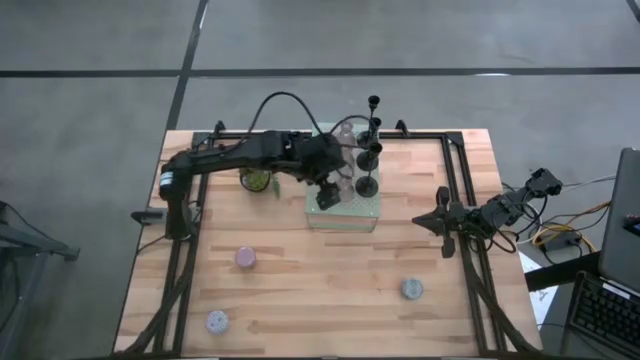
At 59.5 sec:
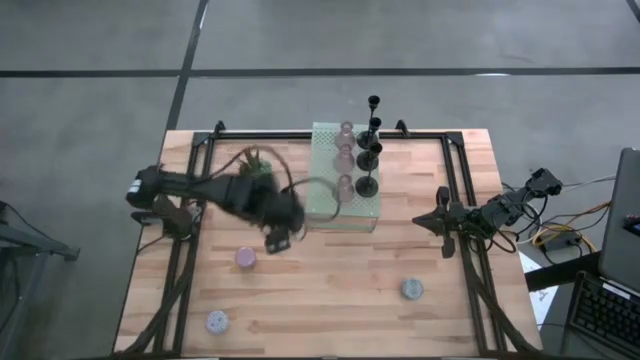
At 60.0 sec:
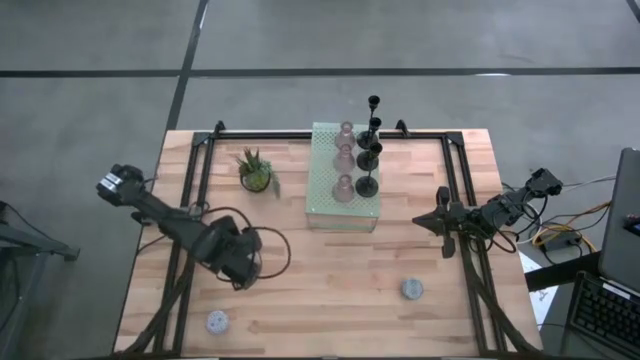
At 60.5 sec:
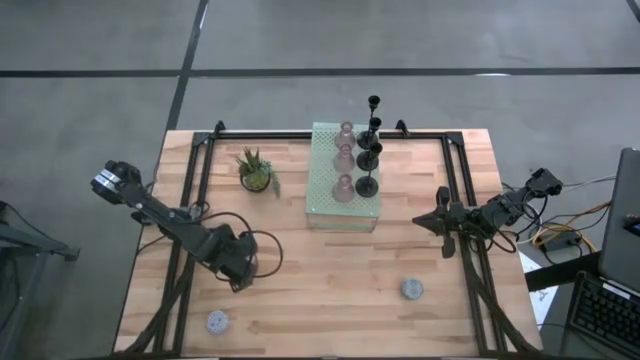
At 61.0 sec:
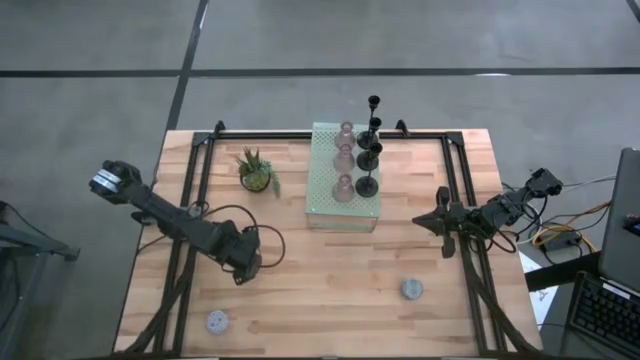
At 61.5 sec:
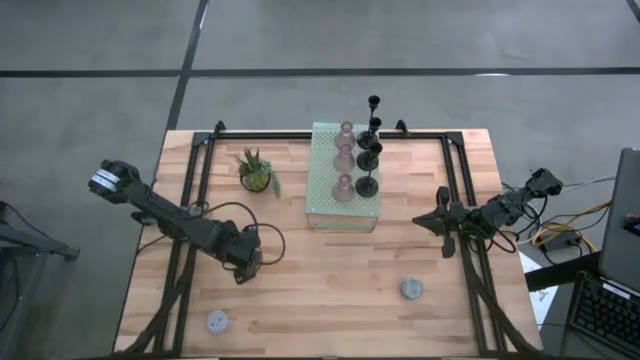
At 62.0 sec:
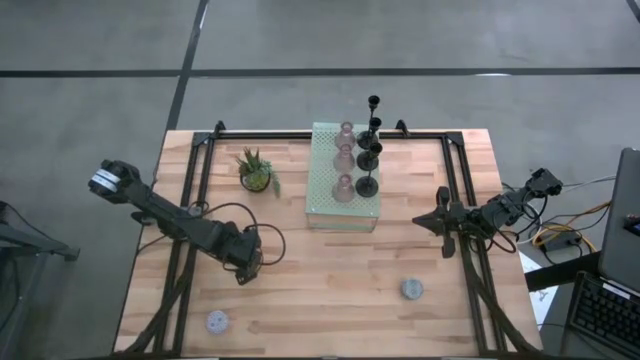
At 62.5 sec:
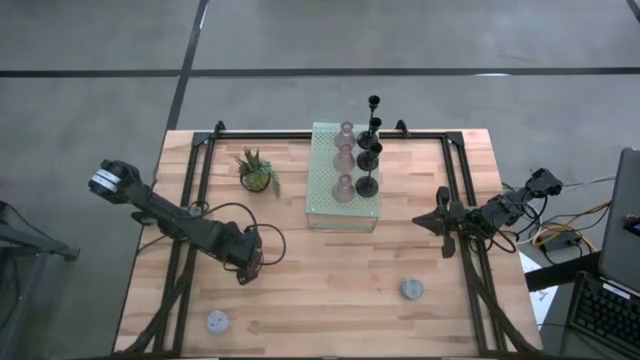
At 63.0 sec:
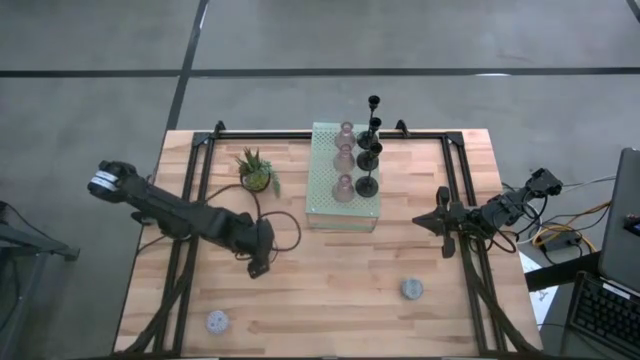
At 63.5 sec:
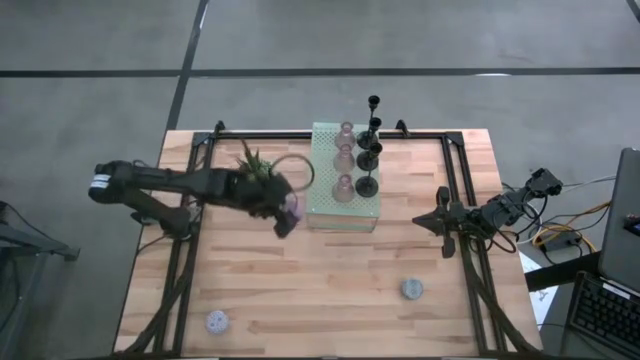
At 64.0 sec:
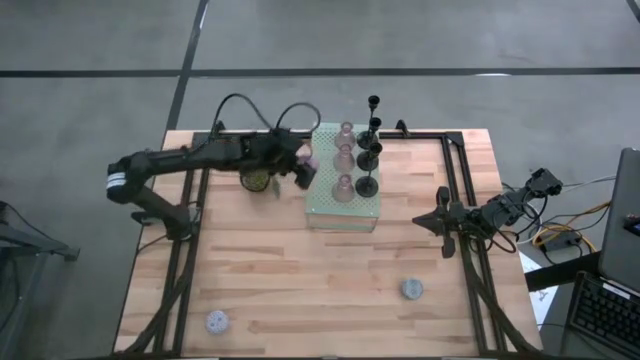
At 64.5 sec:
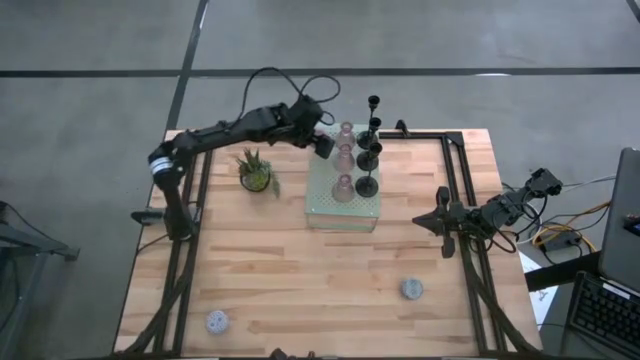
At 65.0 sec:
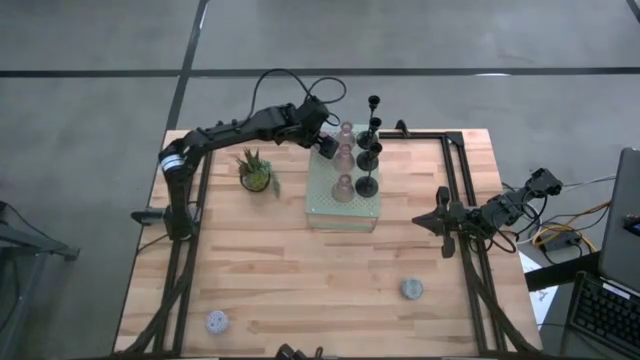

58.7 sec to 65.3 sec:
Task: Pick & Place candle stick holders
Put the pink scented candle on the shelf

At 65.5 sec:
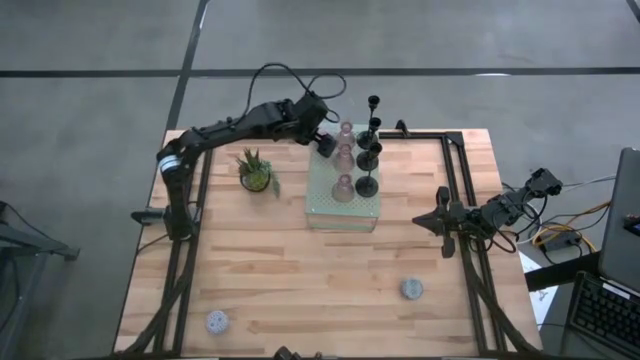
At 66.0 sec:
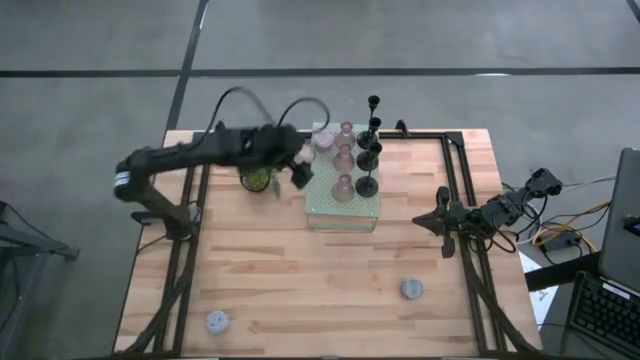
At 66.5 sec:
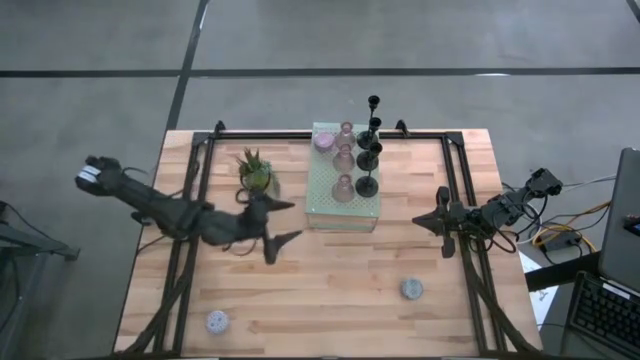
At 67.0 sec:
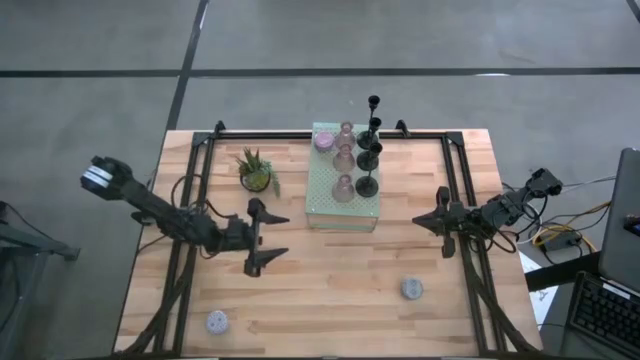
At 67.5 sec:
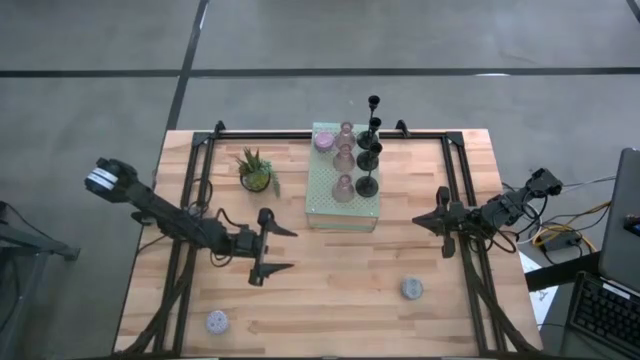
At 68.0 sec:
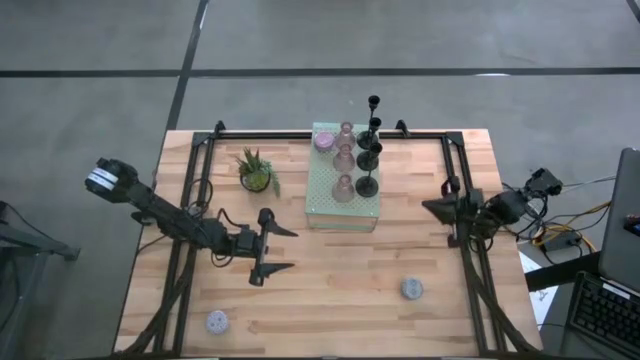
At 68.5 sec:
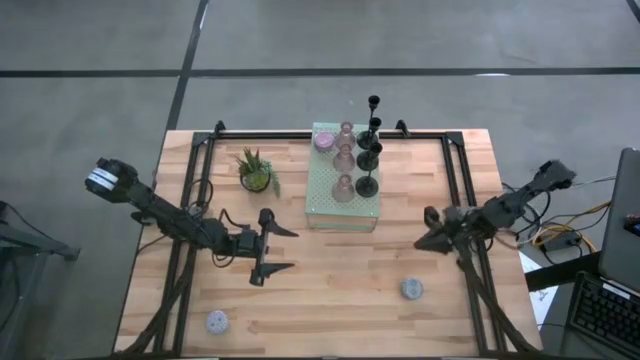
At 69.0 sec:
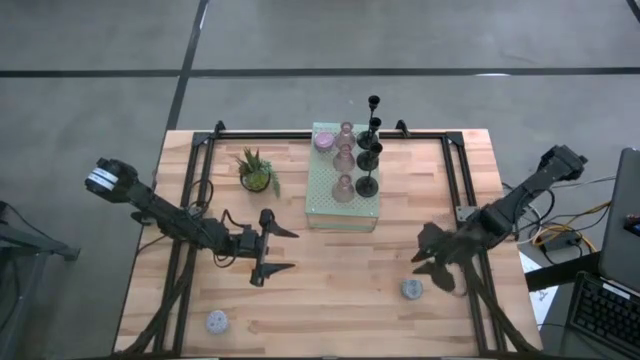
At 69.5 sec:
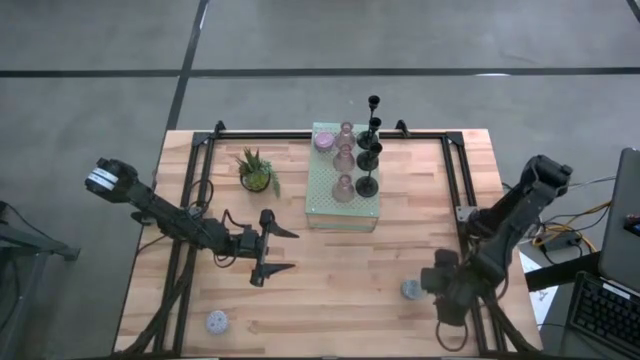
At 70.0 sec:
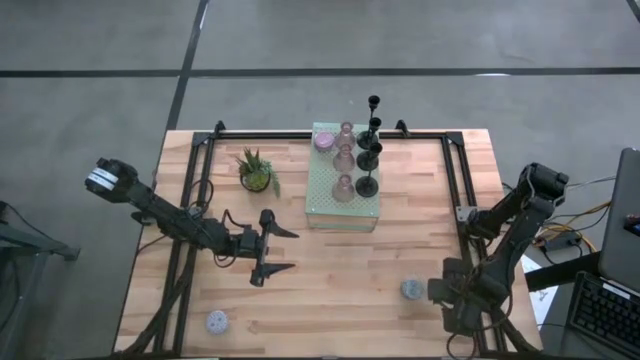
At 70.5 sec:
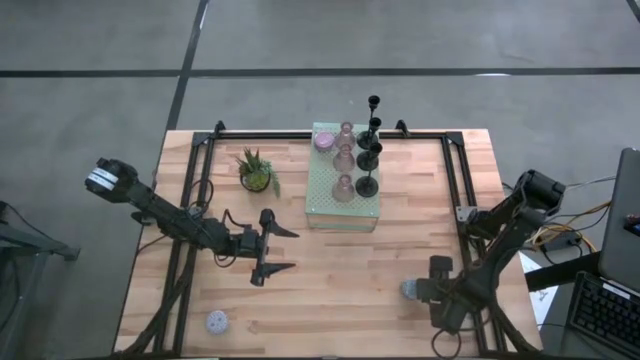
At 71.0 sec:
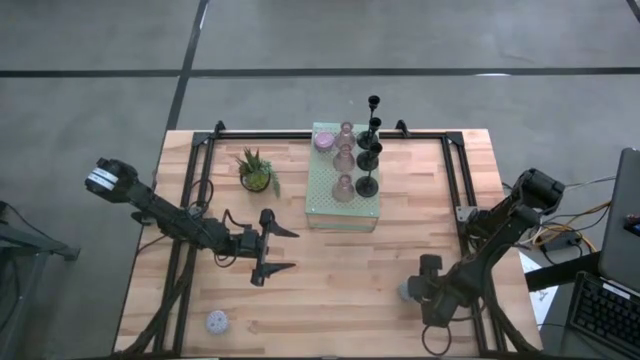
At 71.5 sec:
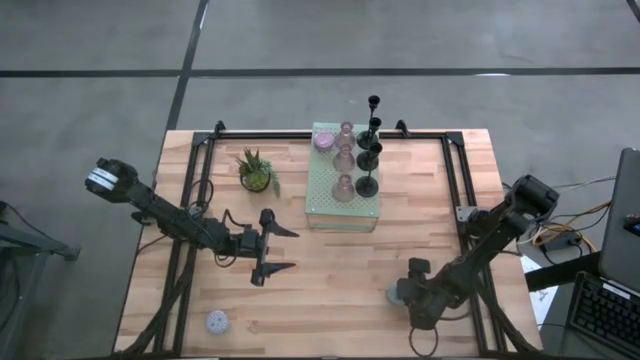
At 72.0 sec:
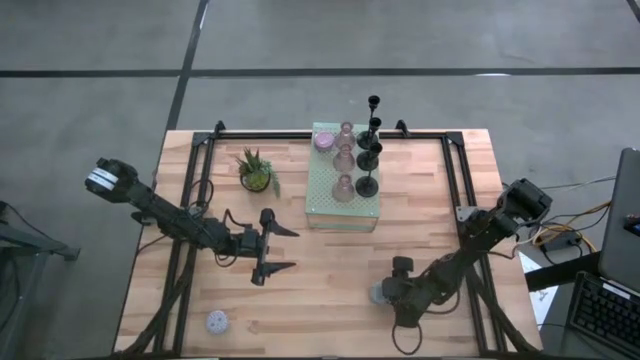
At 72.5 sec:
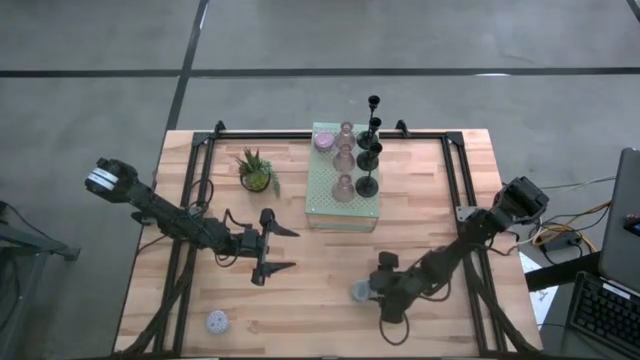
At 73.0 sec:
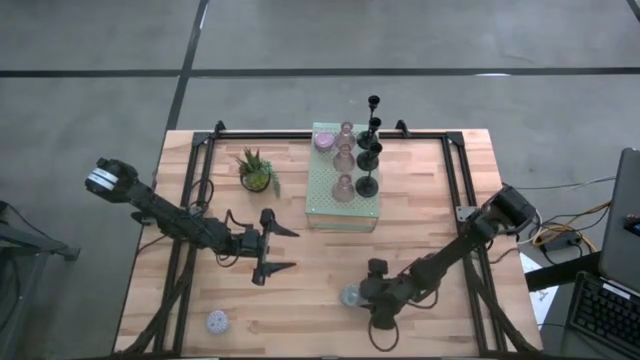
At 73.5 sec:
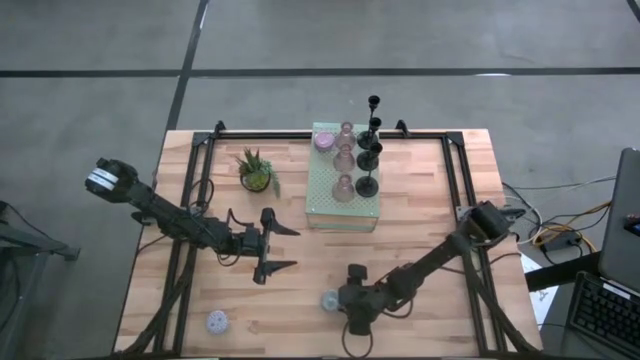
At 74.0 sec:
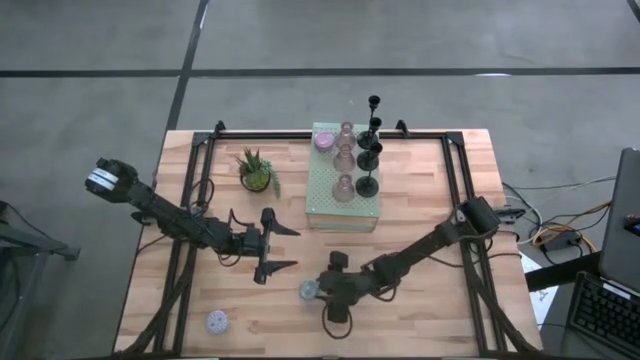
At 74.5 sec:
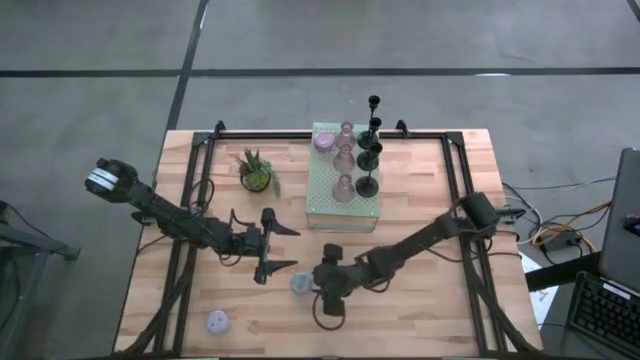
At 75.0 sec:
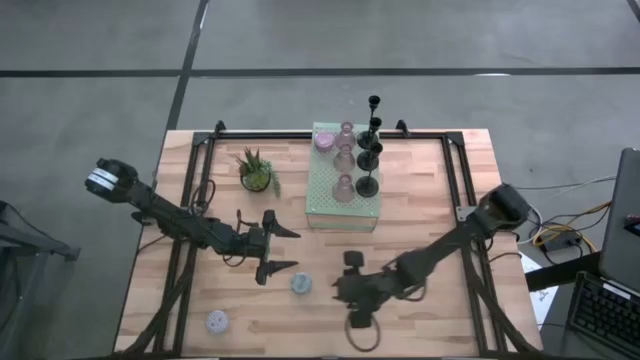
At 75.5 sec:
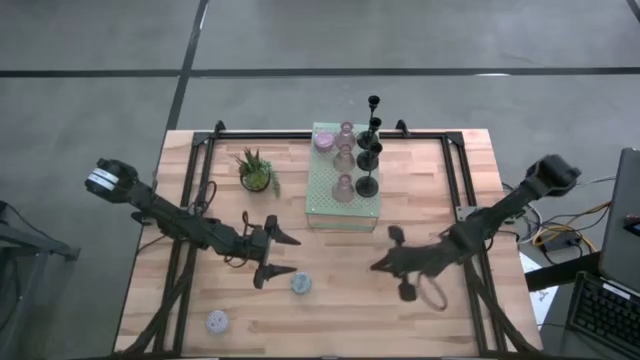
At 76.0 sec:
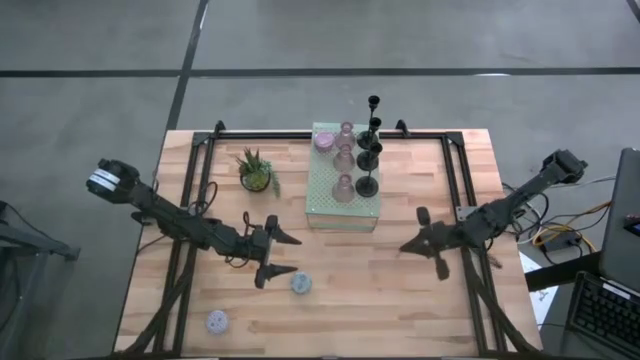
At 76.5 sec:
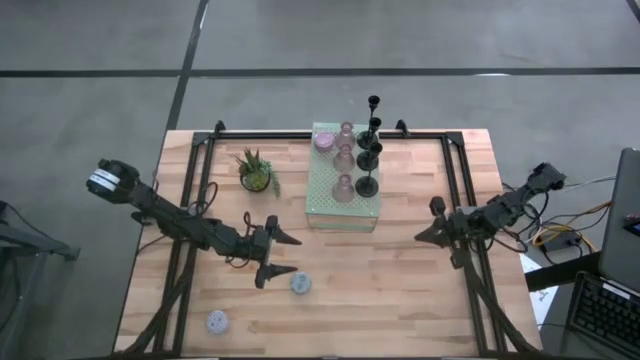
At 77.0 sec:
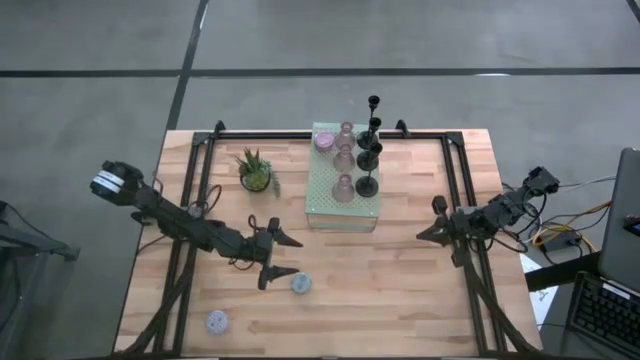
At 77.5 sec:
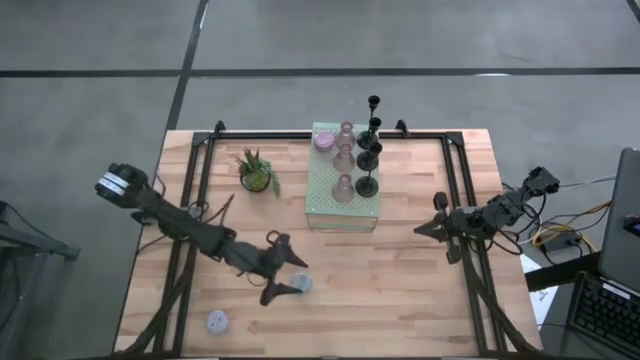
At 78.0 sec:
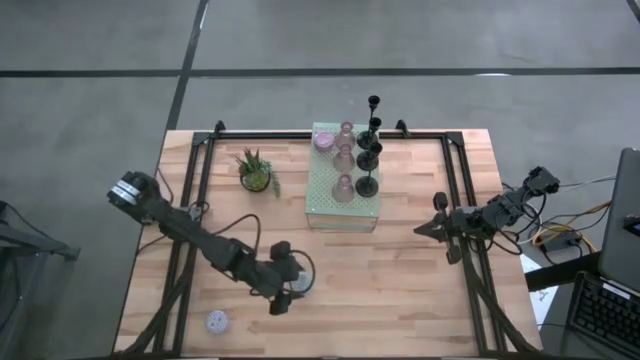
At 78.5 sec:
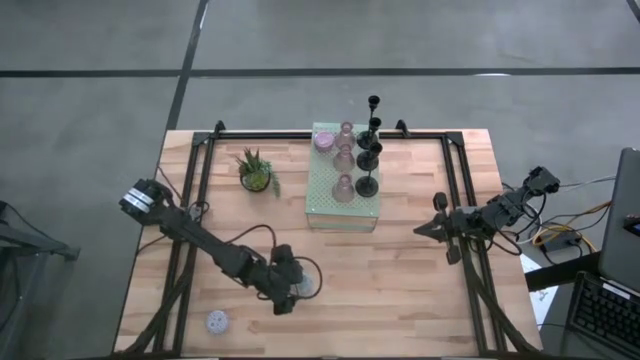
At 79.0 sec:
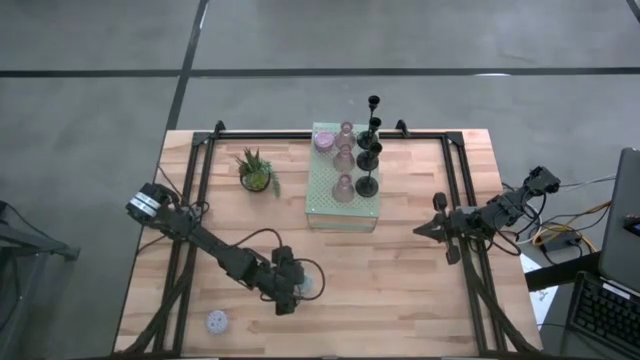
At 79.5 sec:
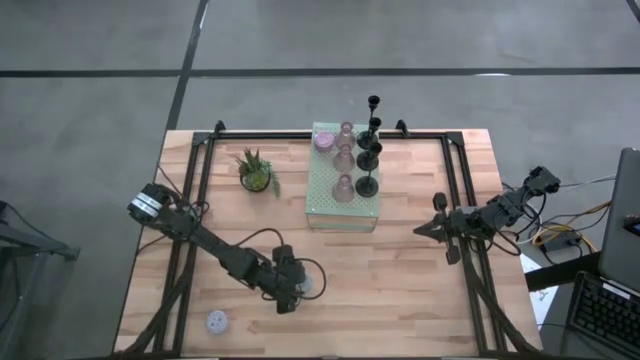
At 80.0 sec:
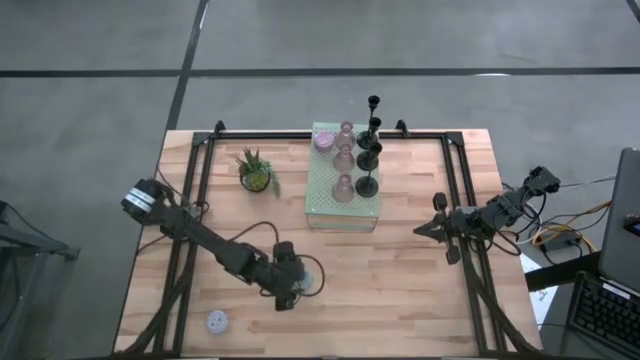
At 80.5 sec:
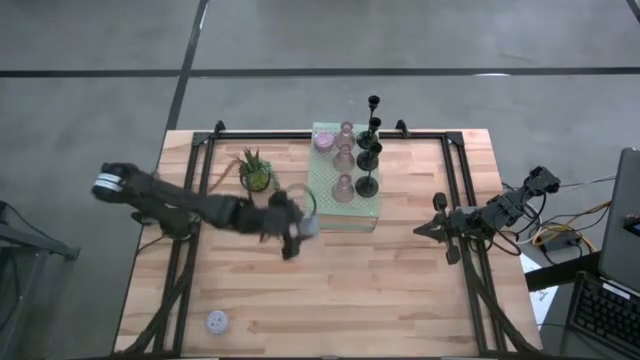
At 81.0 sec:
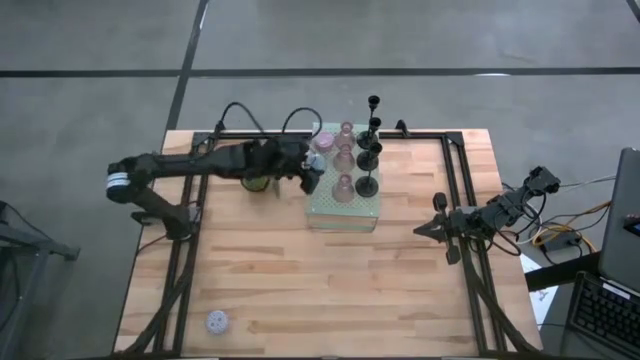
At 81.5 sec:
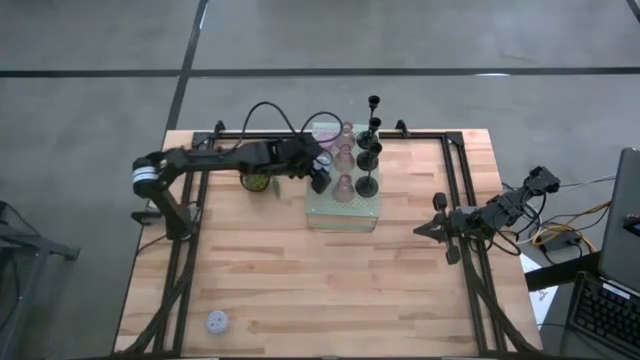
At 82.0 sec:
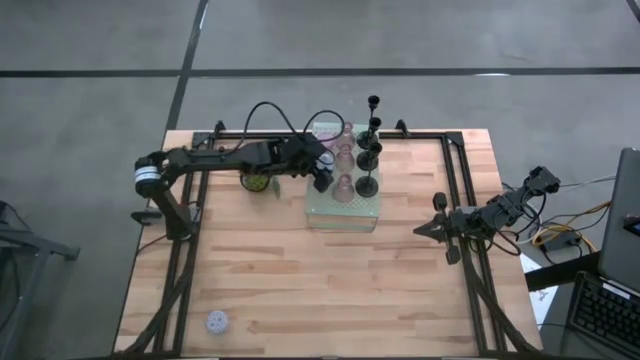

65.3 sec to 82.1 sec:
Put the blue scented candle on the shelf
